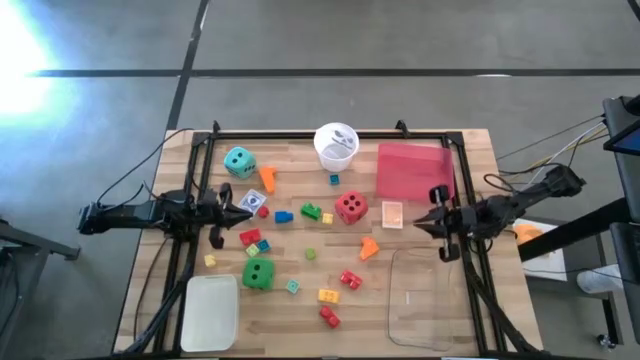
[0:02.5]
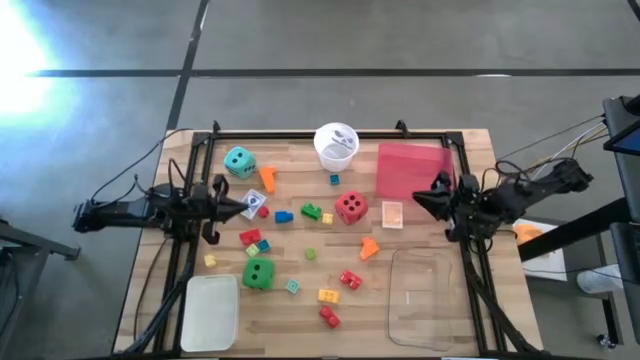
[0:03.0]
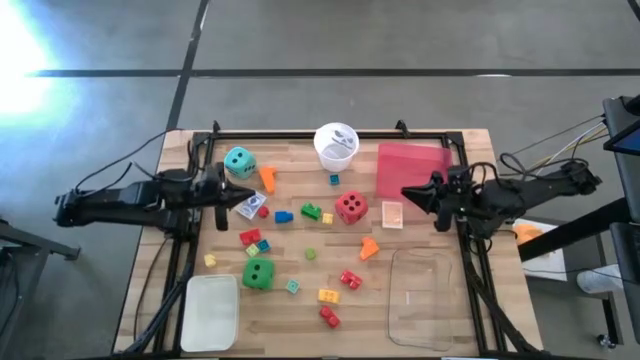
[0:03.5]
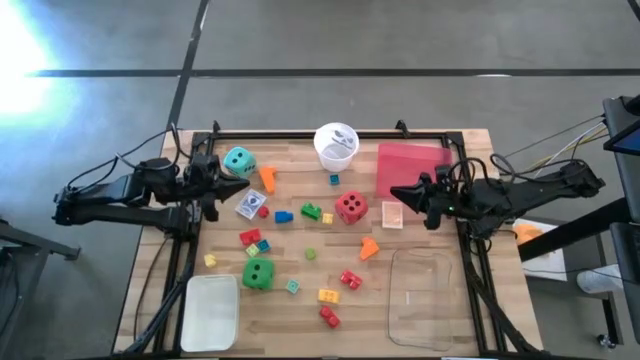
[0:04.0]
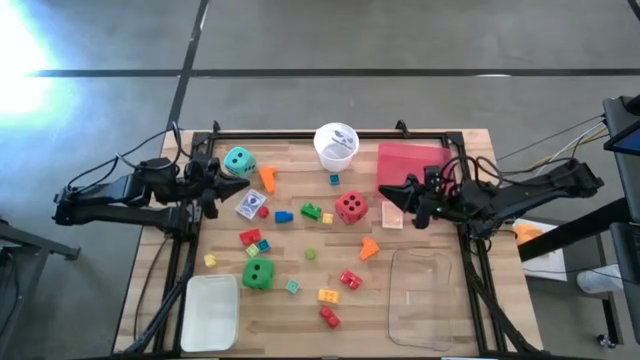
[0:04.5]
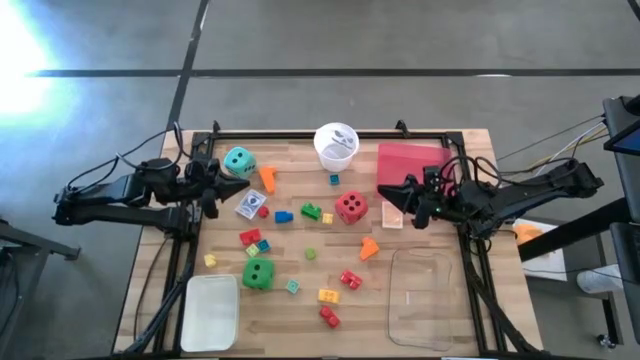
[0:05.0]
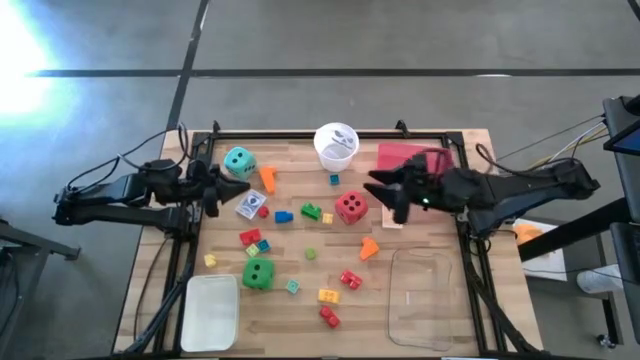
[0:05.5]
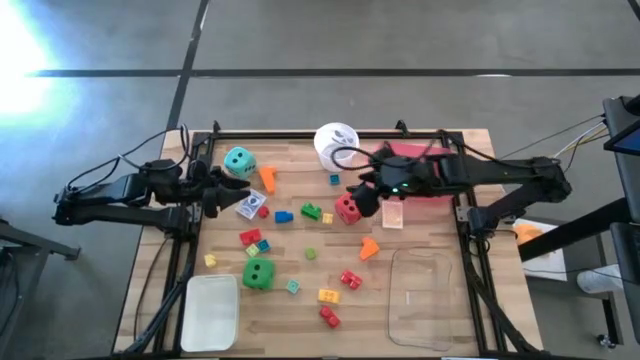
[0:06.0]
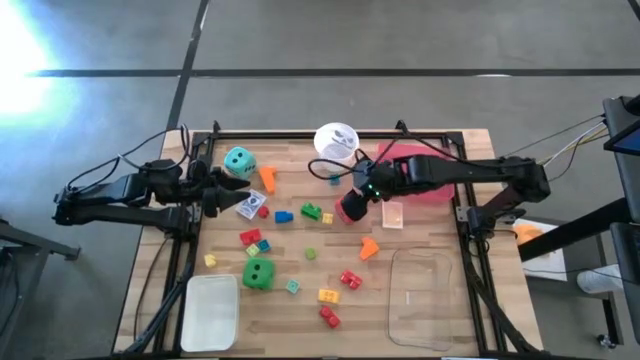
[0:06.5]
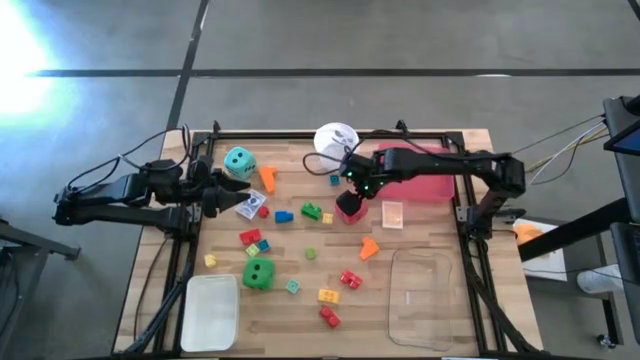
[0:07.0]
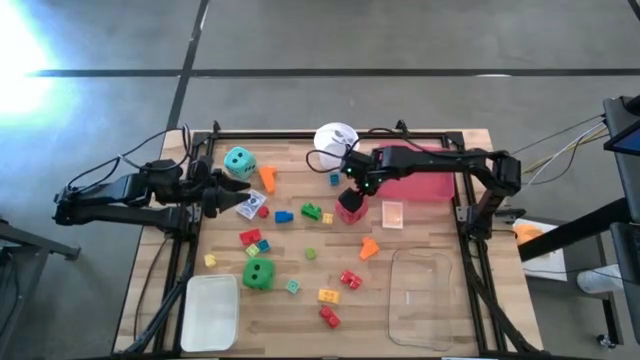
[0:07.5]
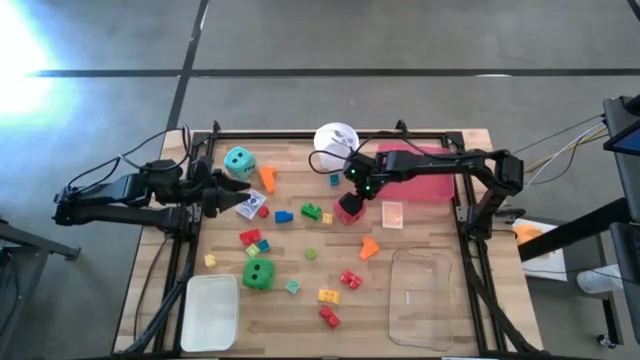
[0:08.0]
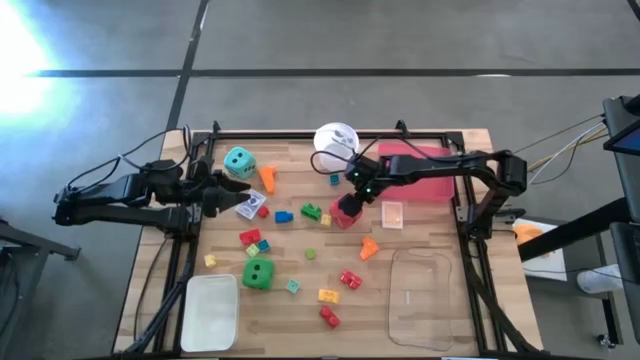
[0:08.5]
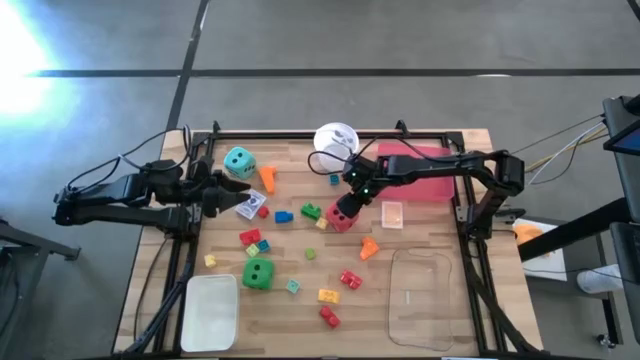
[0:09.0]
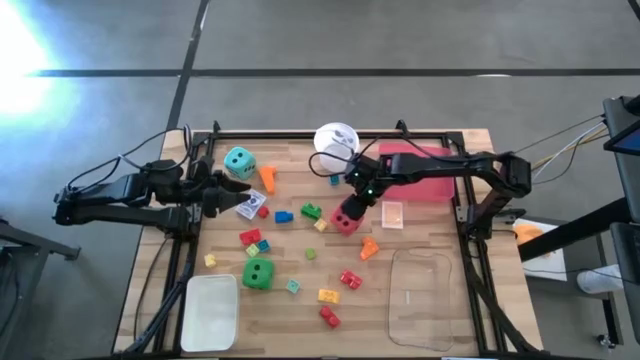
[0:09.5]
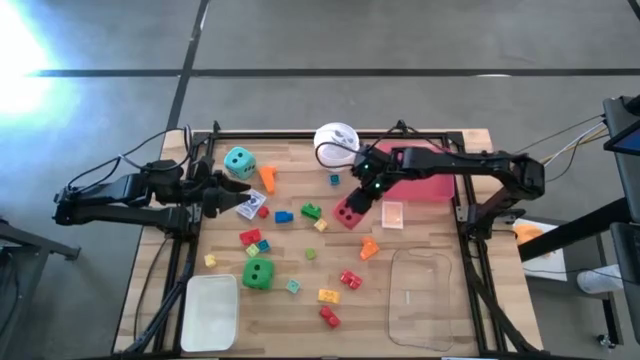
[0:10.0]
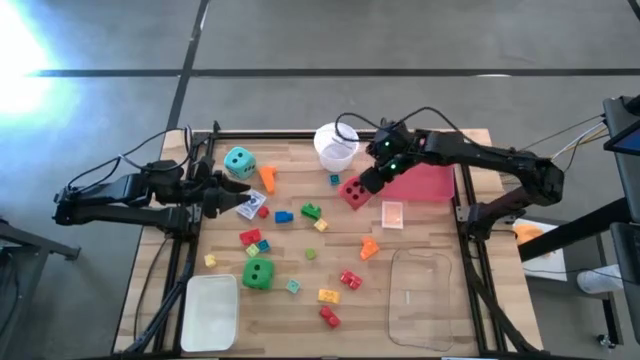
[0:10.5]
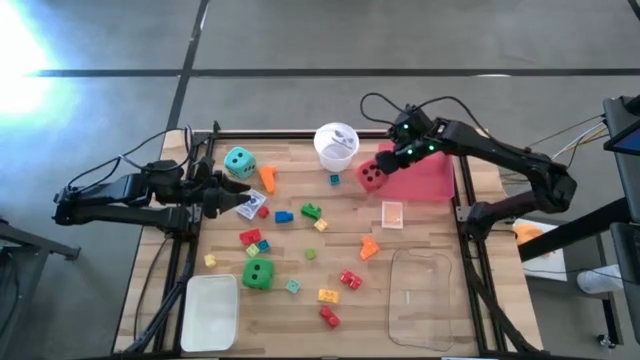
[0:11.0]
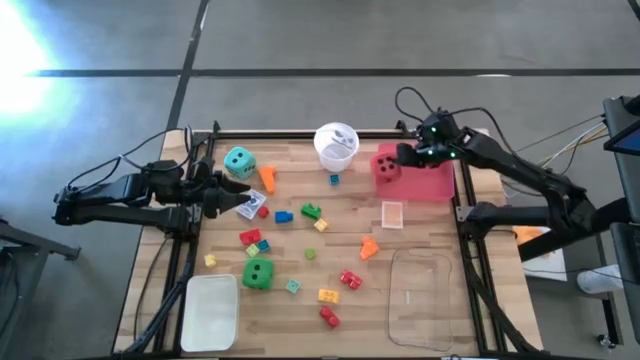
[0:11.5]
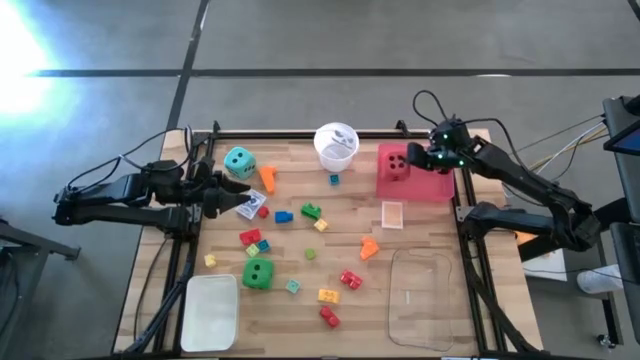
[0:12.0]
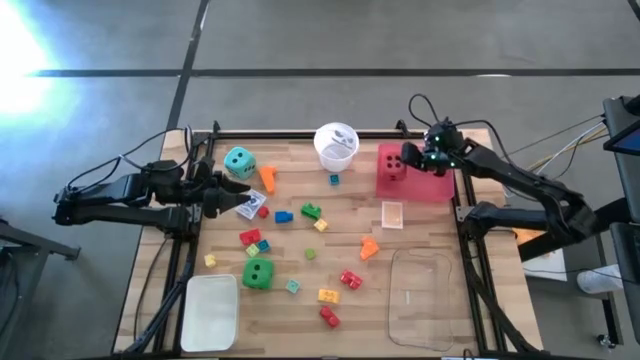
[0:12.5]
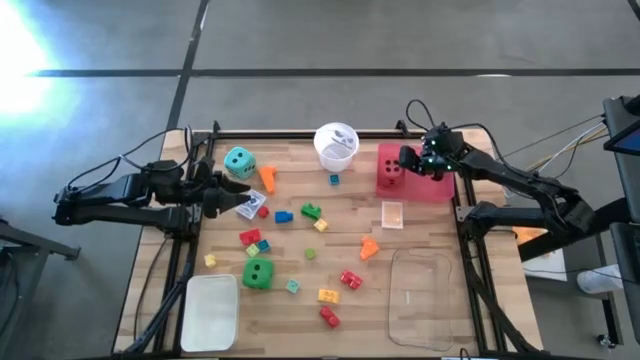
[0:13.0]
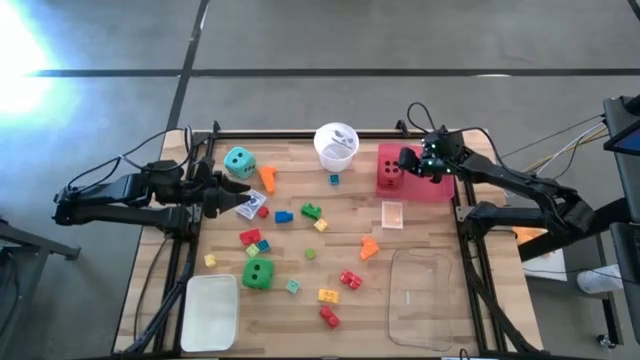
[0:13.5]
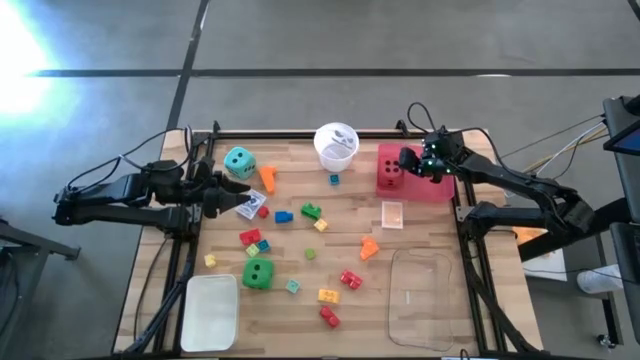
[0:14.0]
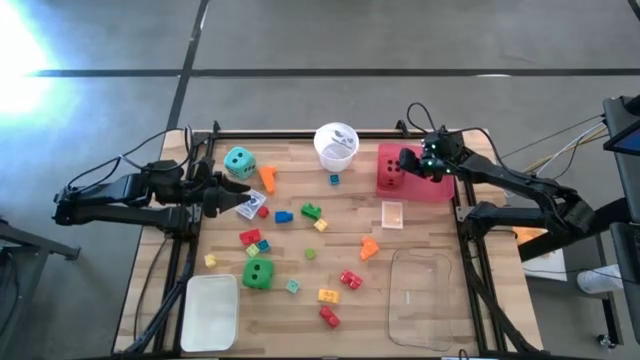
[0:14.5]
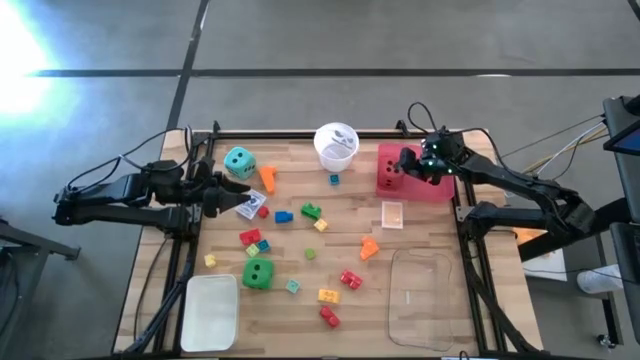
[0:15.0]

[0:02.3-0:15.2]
Task: Pick & Place Toys
Put the red dice into the red bin
